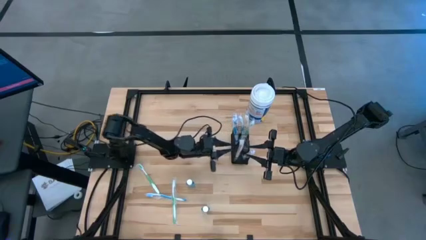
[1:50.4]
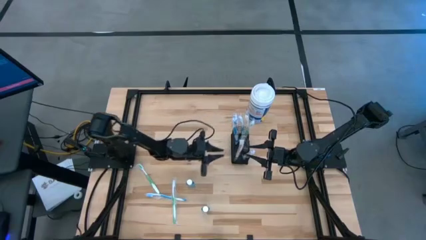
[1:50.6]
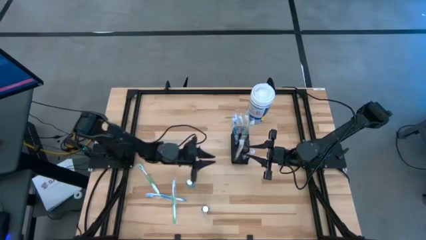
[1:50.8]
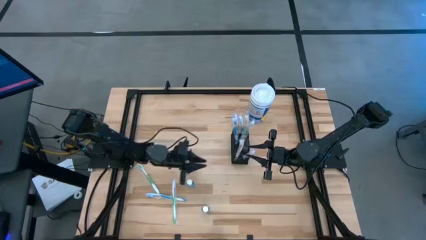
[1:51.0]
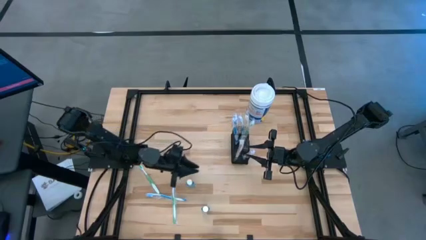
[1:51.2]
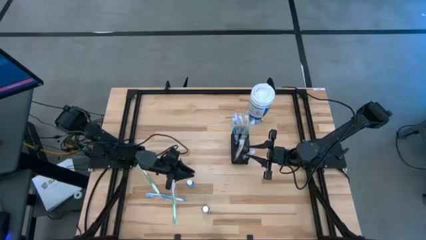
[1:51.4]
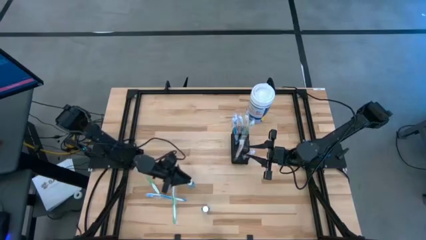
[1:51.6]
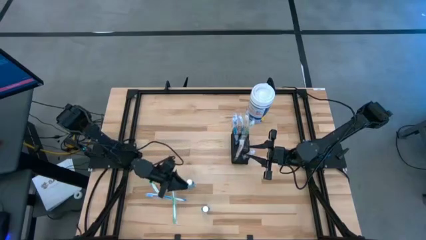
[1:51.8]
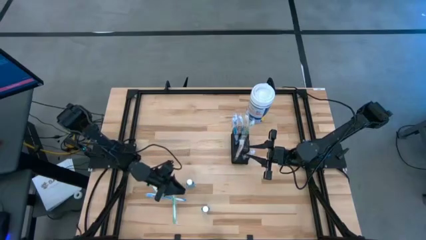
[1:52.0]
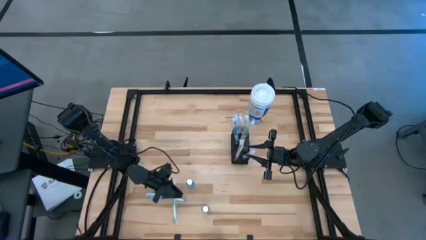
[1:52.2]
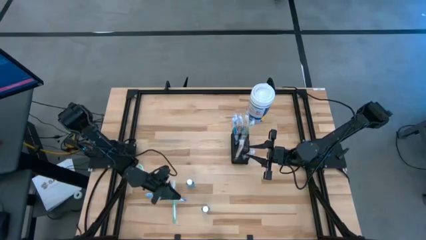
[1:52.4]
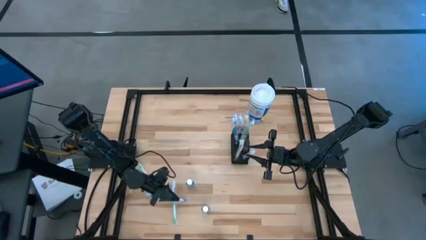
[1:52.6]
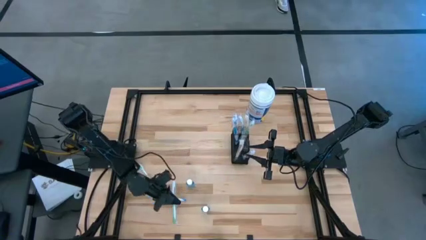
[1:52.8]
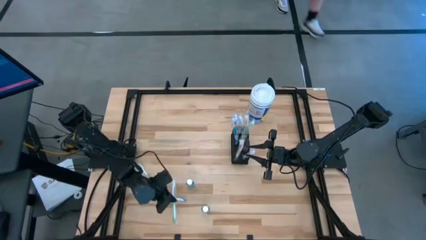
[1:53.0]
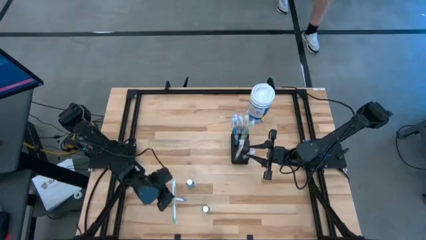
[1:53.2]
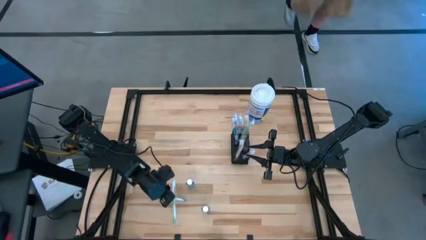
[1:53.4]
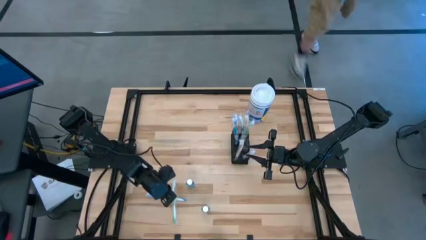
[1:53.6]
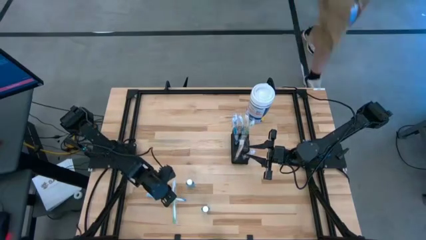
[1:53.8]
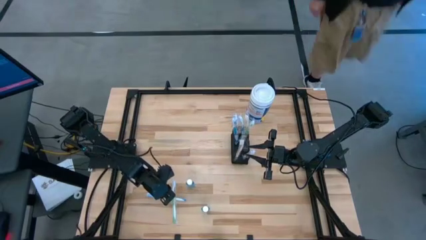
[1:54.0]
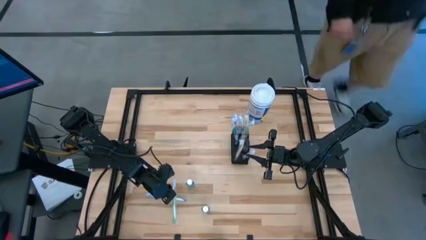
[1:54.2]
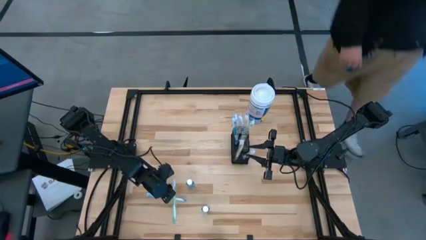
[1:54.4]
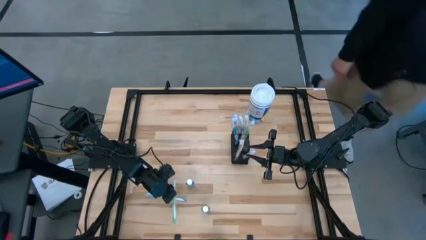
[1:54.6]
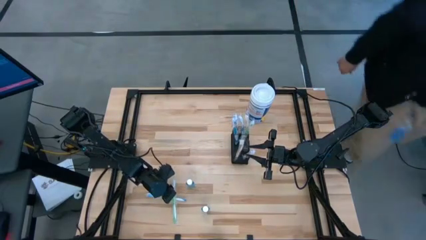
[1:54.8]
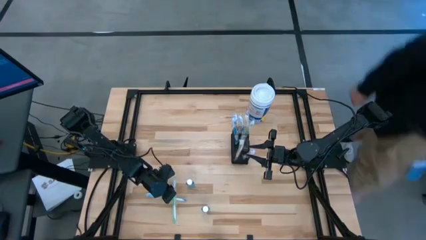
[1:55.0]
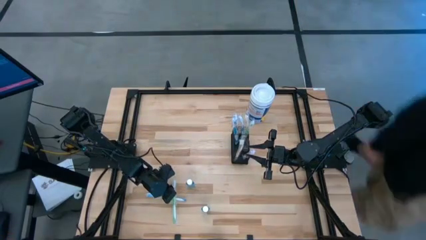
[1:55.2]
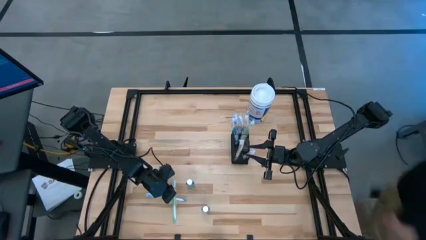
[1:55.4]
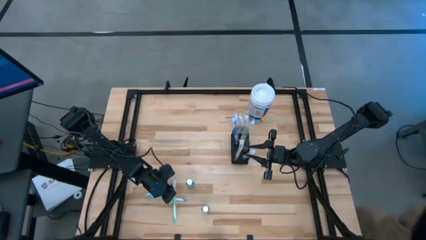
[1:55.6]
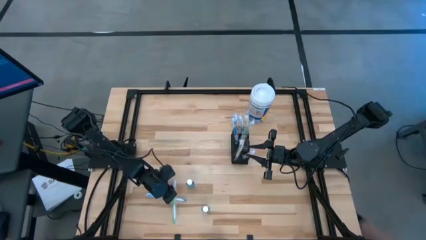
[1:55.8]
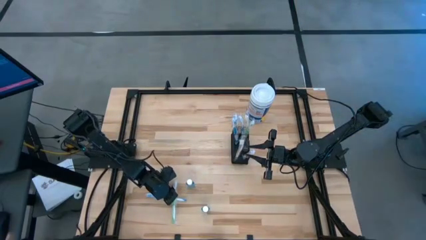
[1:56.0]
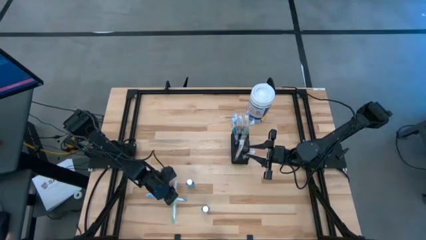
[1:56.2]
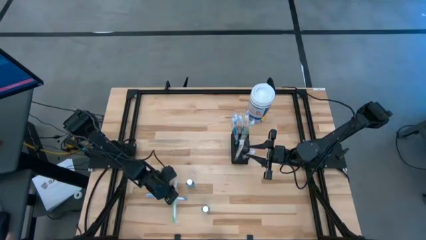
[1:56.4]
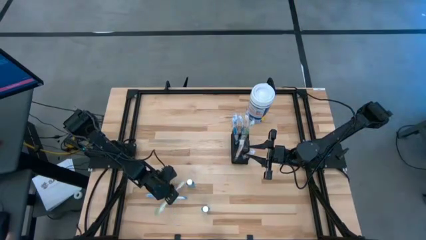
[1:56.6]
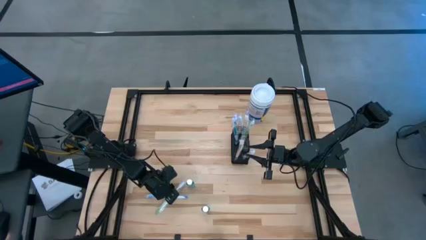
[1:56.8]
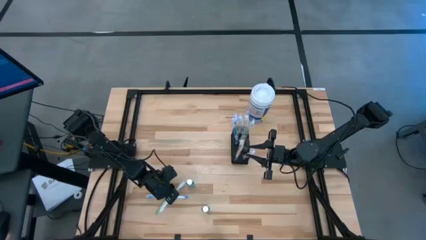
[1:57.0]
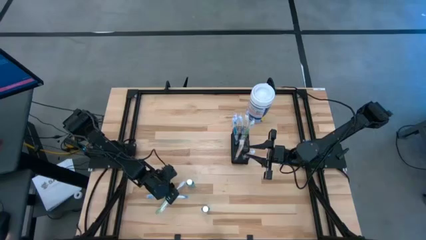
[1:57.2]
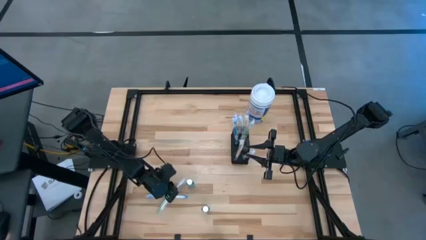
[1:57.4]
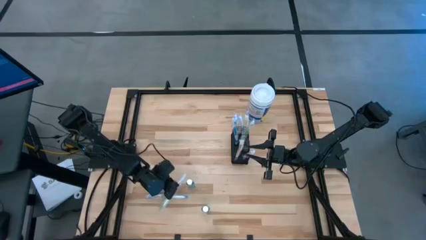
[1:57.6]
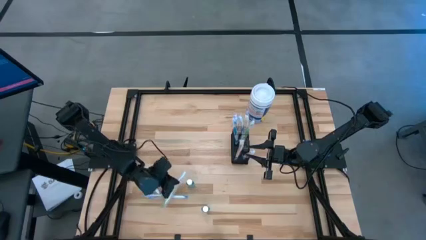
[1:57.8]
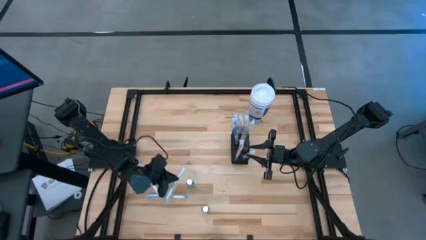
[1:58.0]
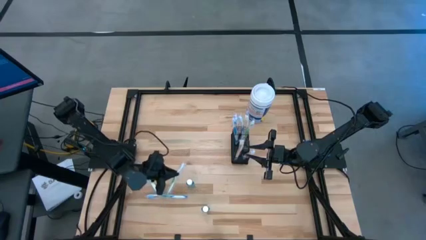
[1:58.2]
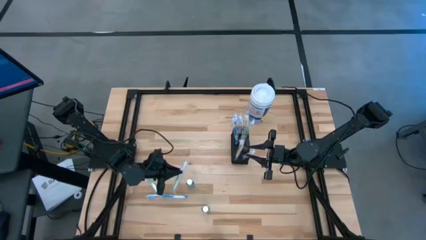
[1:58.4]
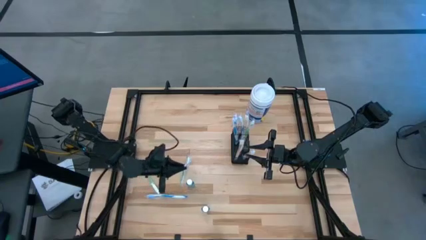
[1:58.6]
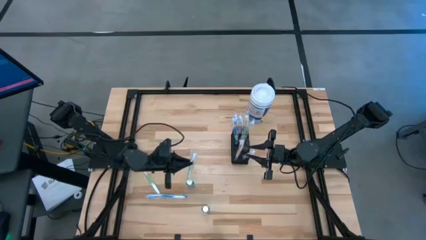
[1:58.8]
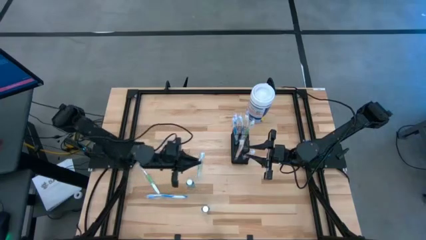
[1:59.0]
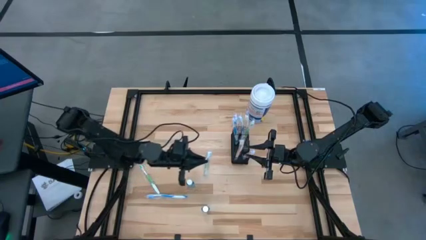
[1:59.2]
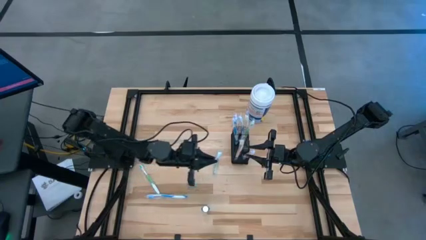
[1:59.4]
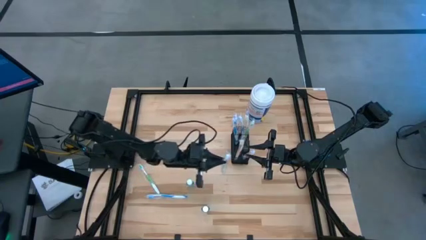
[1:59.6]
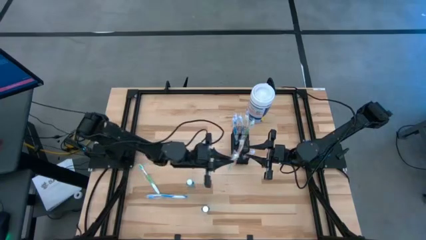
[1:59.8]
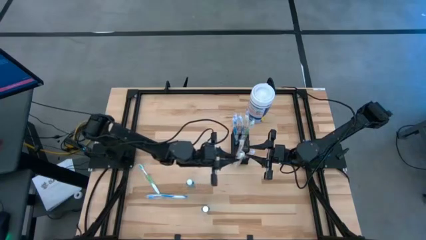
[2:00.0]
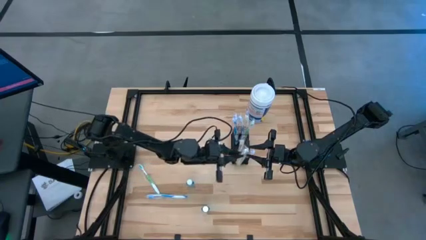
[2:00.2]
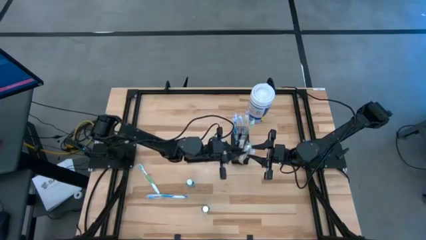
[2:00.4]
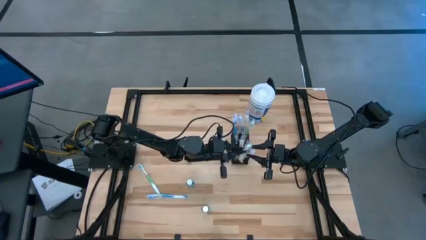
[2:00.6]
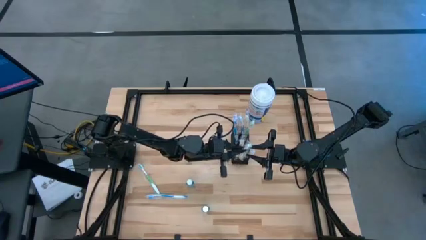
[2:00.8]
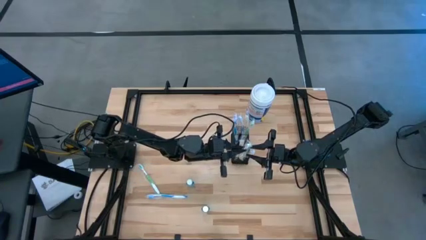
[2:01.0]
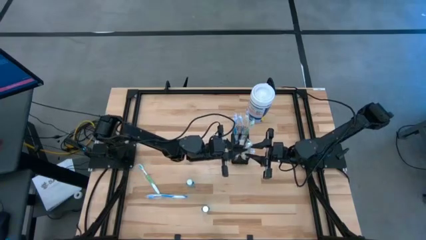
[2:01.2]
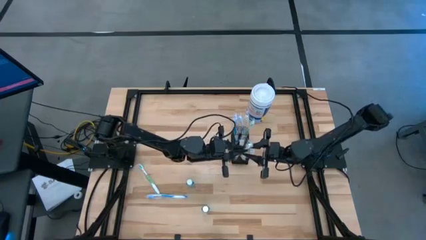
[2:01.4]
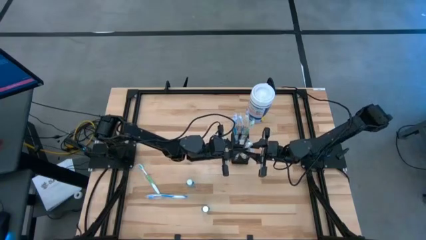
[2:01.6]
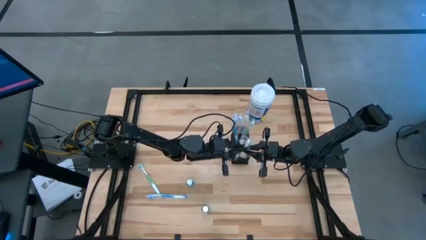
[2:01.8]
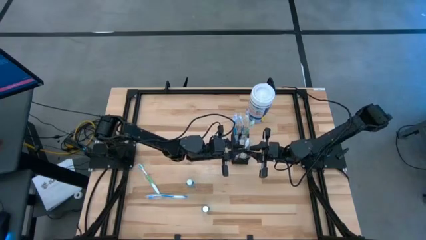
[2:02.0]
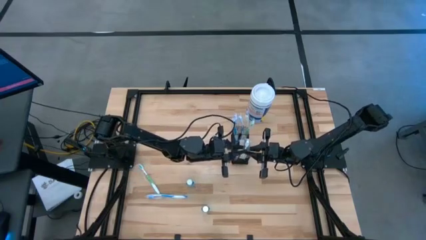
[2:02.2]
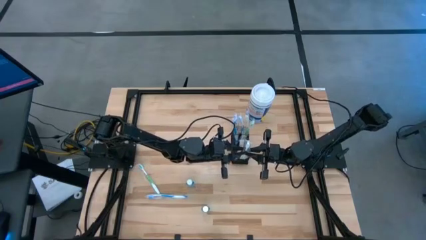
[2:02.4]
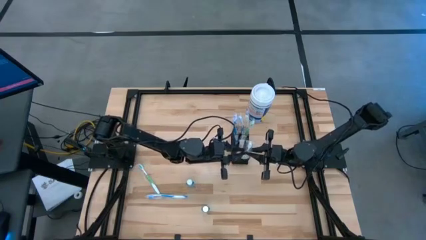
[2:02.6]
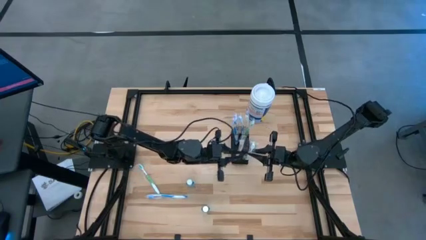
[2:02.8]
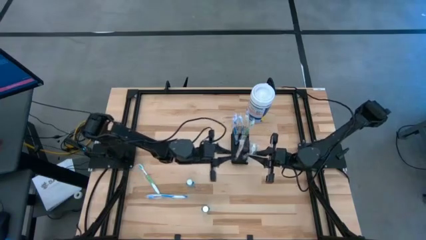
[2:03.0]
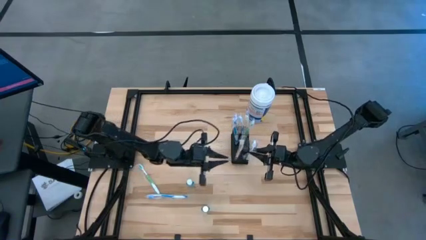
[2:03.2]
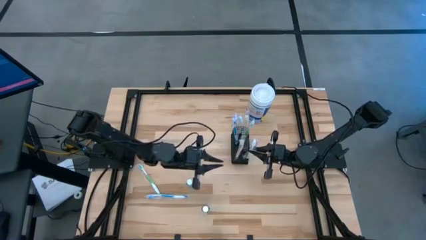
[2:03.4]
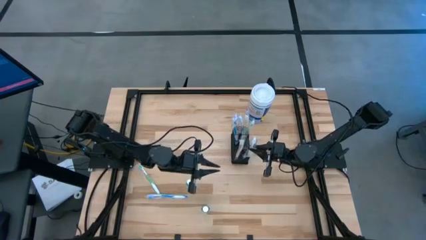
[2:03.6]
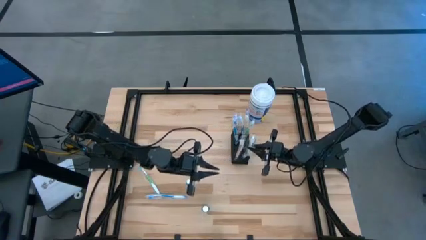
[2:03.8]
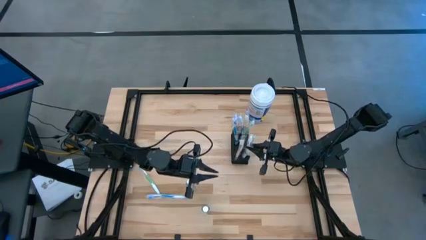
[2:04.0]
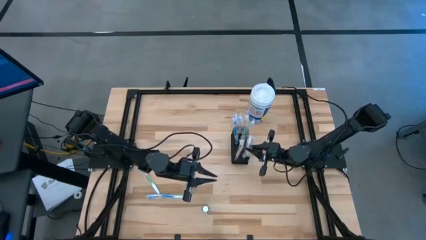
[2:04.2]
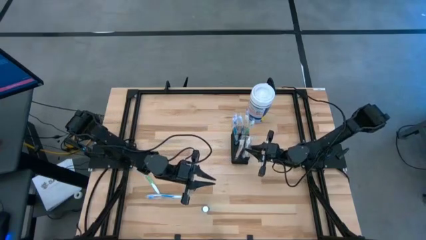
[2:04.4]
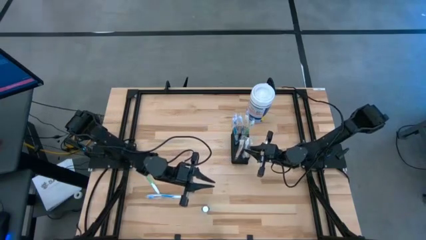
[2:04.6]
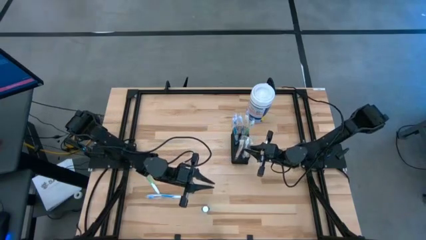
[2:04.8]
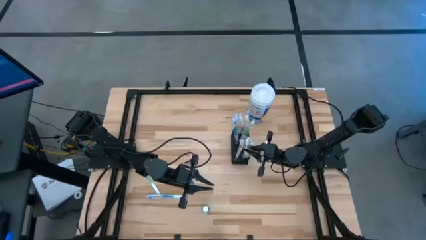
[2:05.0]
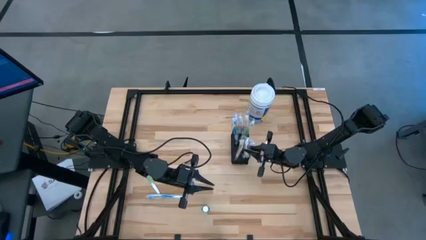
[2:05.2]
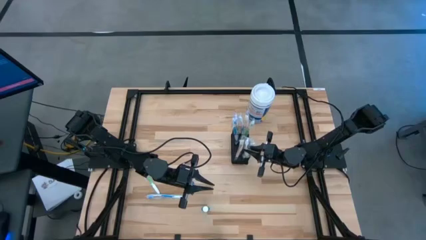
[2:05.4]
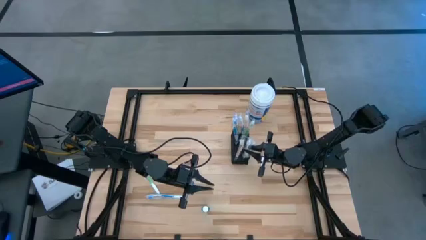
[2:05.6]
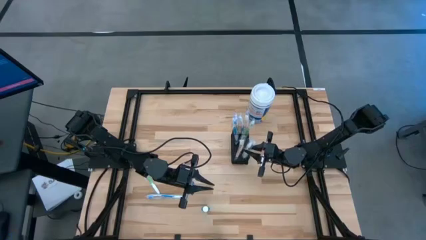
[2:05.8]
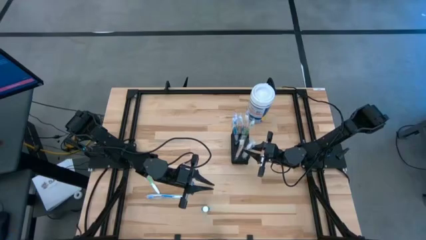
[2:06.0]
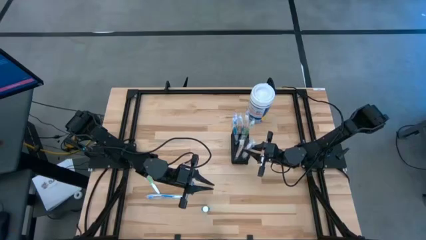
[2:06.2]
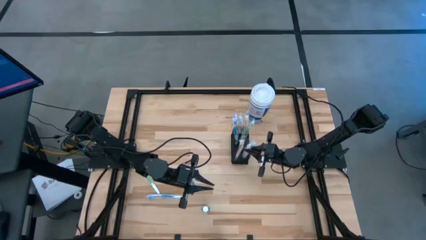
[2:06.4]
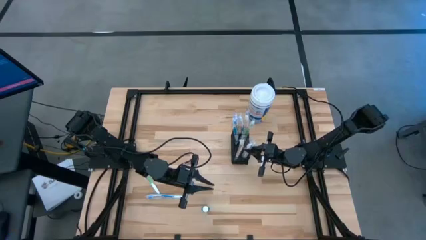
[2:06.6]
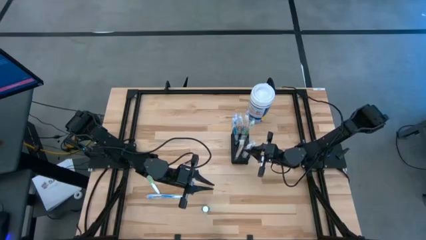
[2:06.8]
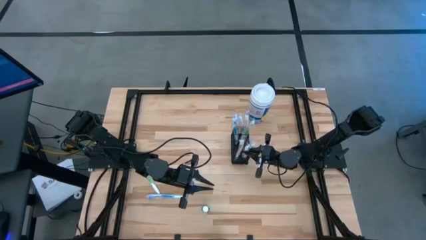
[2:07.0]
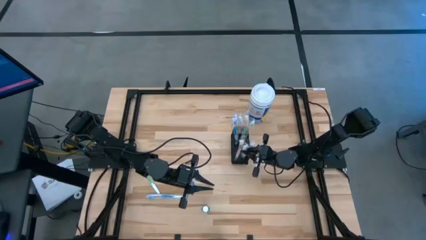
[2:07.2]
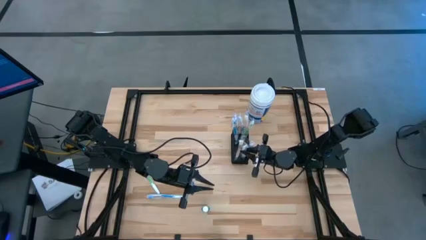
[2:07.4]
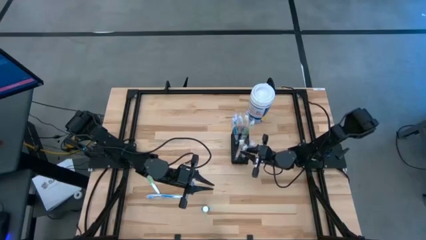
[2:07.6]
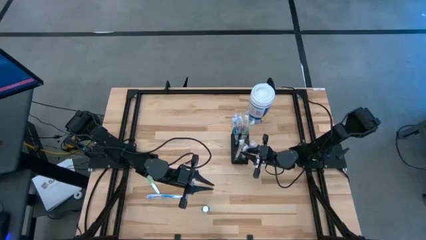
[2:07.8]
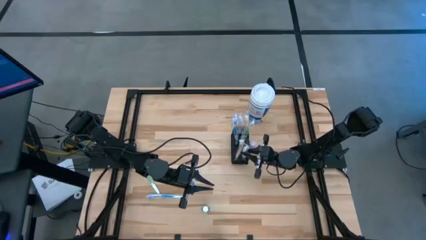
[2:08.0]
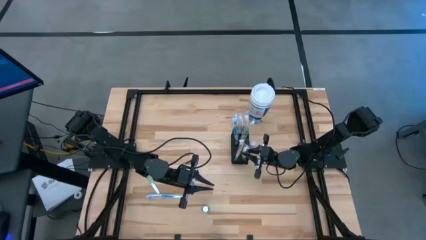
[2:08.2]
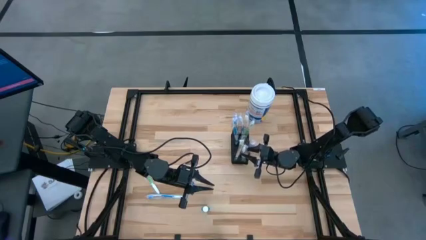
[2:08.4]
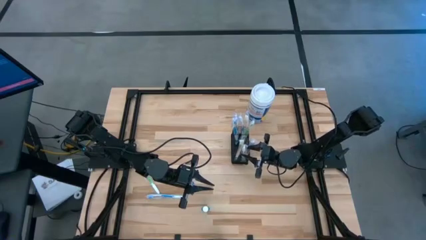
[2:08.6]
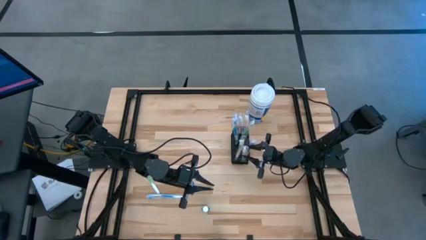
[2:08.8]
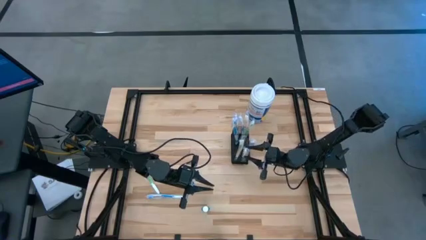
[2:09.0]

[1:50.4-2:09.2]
Task: Pick & Place toothbrushing station
Put the bottom green toothbrush into the wire mesh organizer
